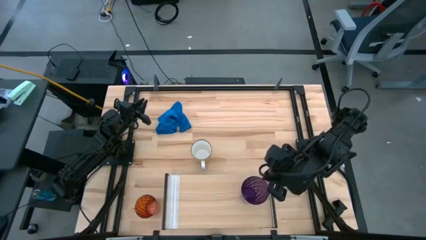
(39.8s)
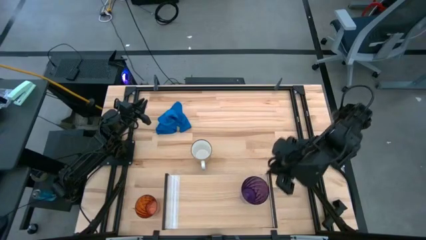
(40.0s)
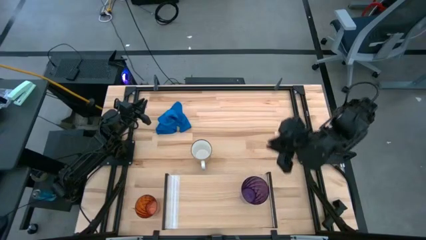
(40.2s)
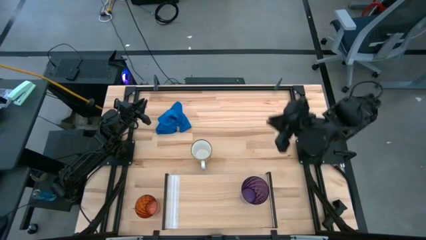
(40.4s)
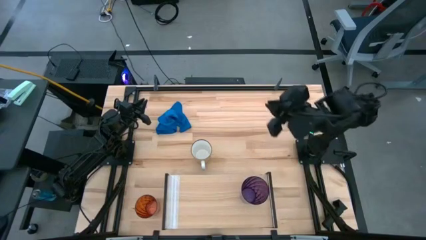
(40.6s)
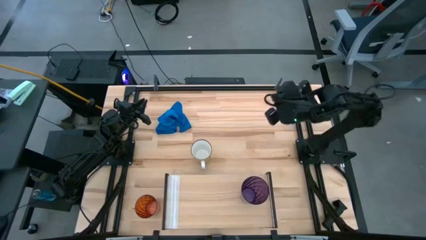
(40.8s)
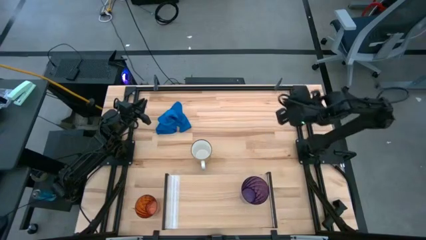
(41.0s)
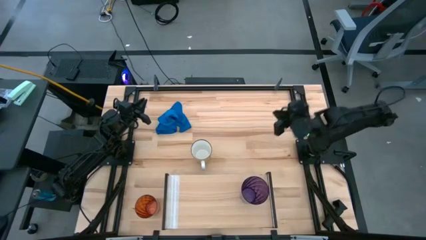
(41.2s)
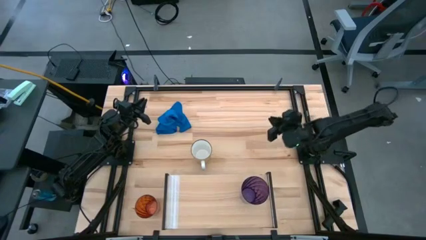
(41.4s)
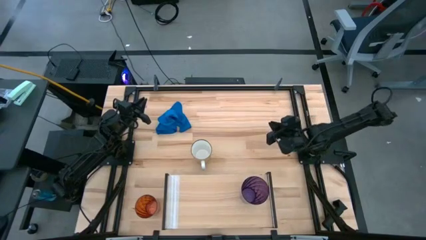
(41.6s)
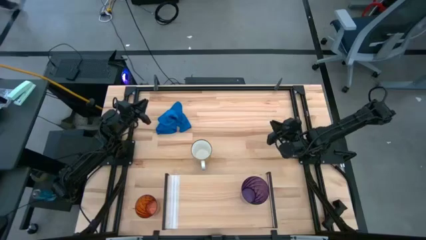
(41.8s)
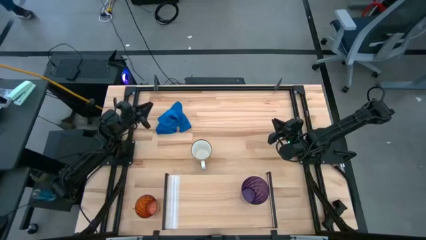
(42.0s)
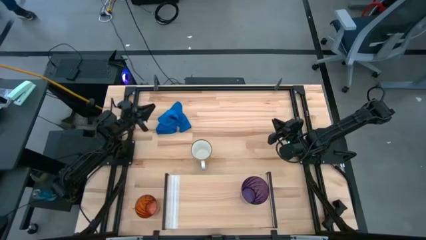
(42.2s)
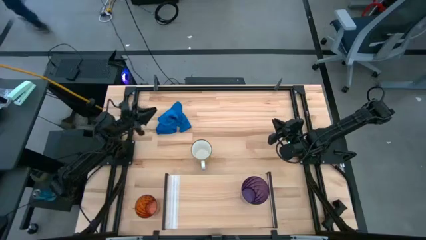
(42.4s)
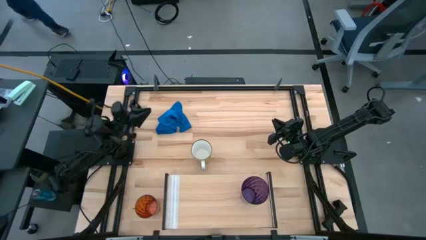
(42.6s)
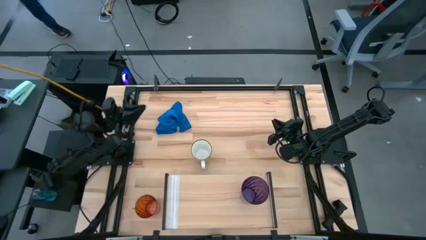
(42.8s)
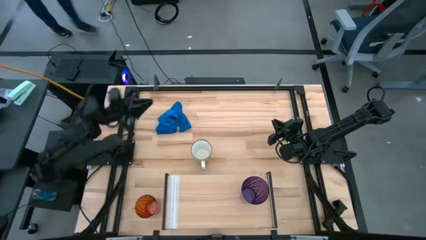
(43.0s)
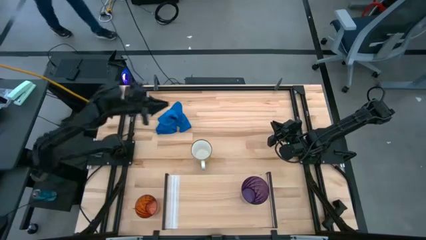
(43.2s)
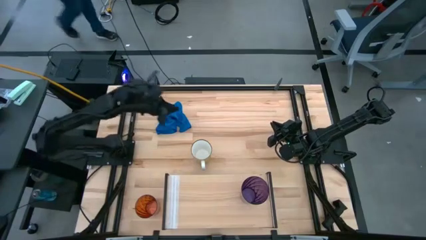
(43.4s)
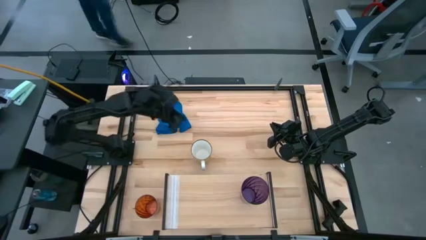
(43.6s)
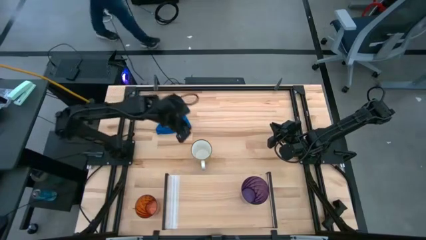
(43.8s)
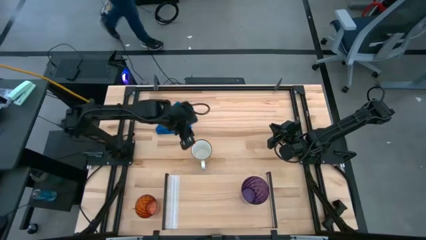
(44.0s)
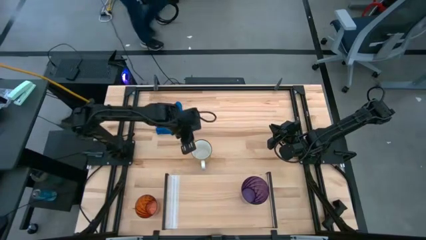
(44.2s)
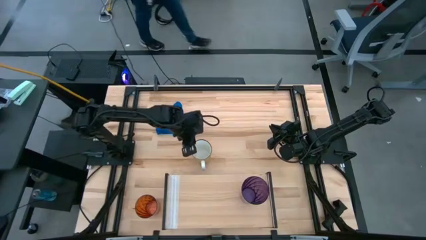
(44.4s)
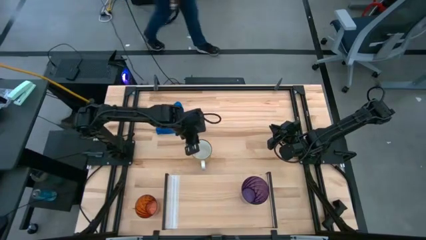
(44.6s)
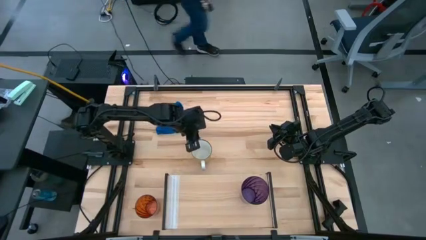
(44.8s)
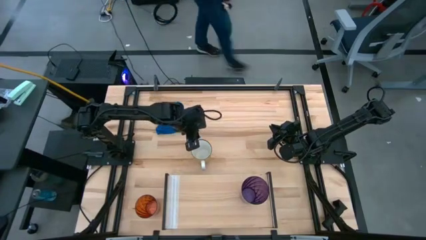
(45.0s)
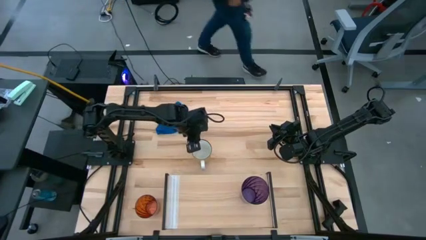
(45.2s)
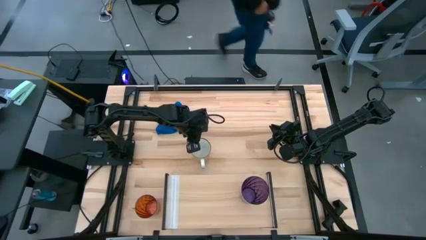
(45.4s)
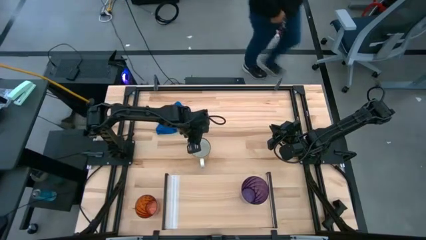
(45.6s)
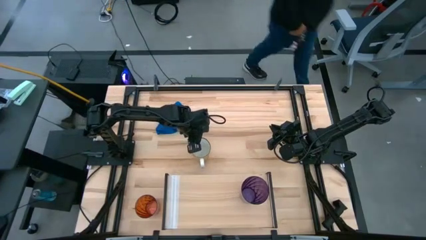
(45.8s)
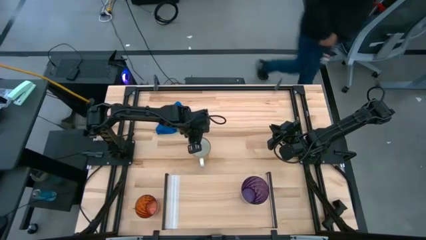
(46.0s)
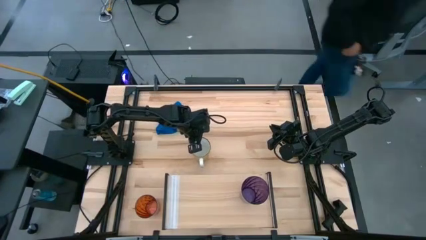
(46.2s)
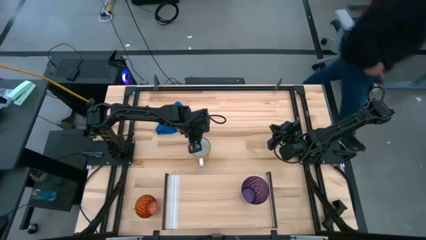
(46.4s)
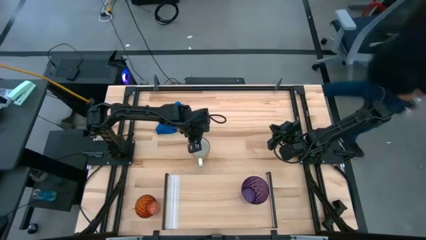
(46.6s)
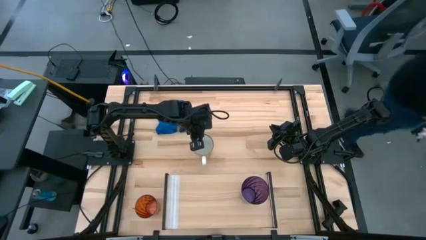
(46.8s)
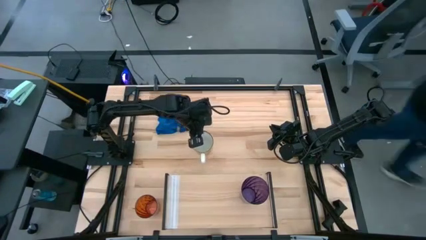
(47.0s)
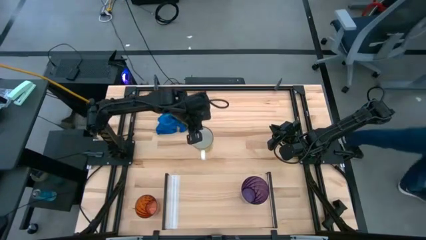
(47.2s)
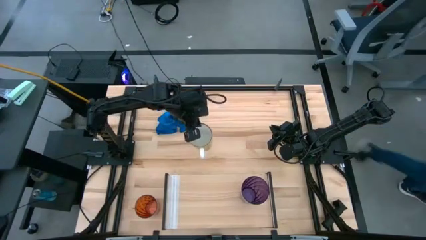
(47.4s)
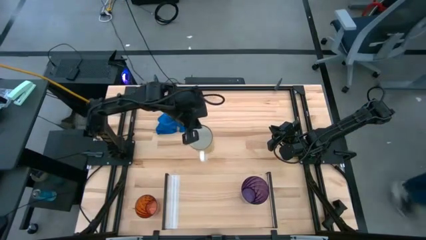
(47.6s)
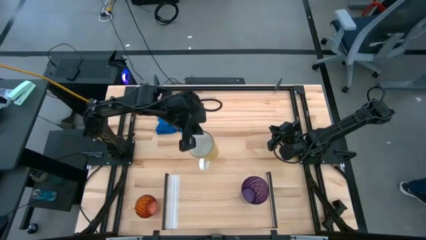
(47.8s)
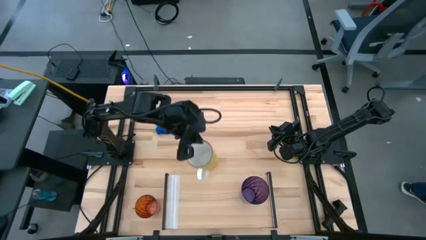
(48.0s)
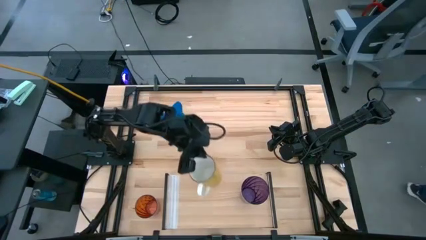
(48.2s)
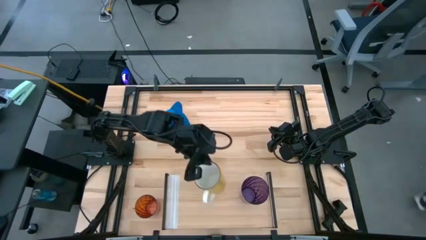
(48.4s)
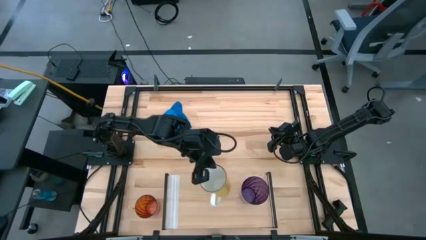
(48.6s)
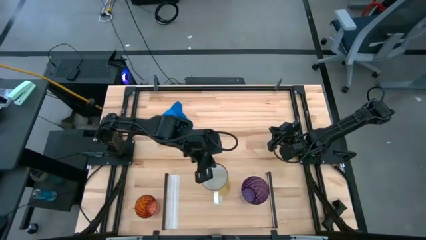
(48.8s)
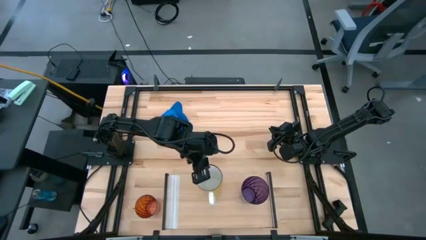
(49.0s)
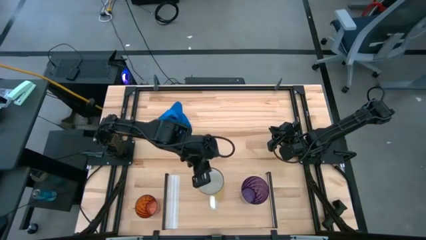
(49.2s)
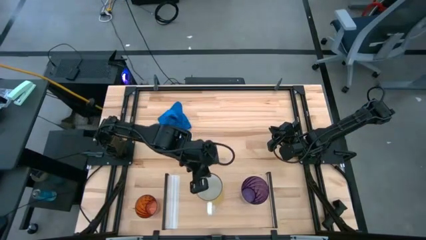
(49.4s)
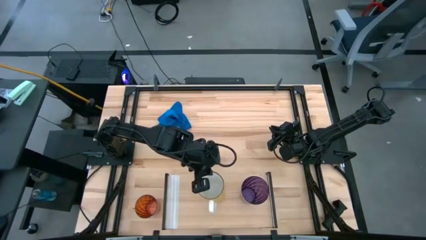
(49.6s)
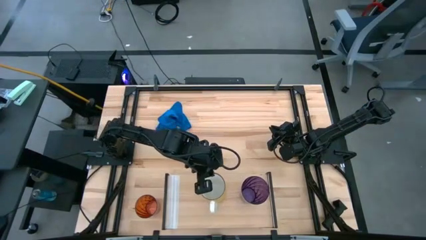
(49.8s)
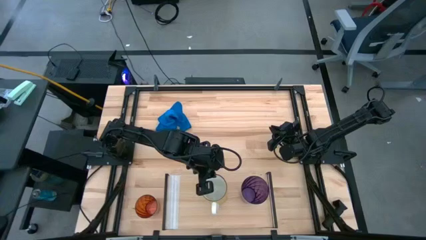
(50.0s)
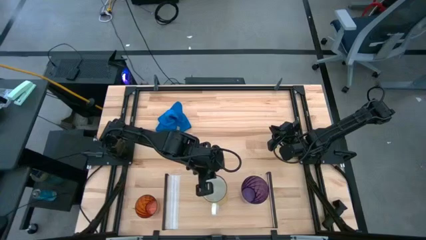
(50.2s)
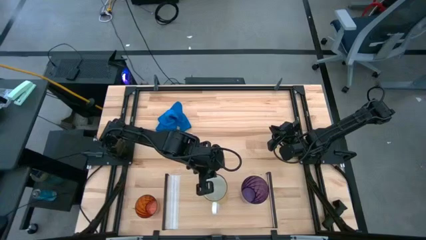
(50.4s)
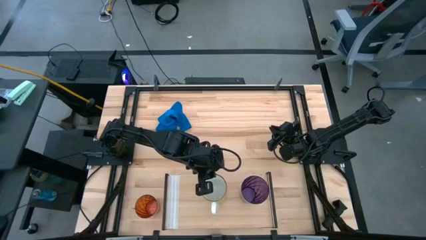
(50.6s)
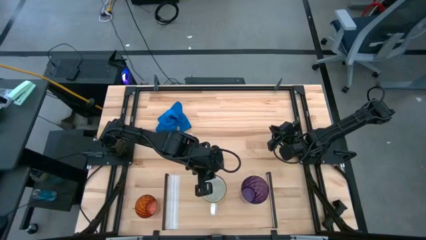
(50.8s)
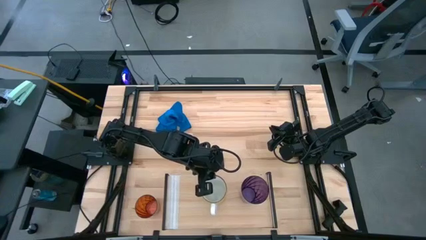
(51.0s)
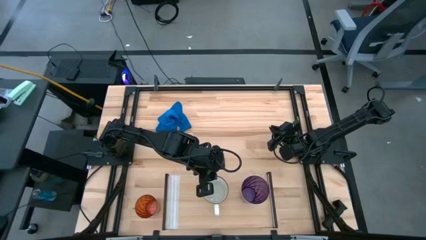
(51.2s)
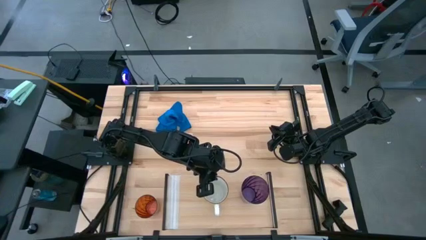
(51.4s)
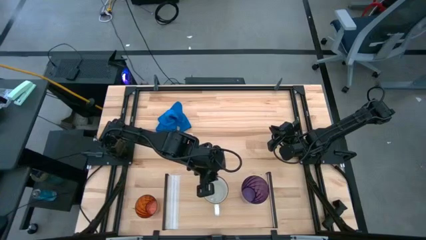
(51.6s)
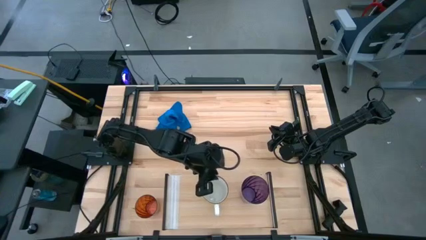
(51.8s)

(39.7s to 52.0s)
Task: Stack small to large cups/mugs on shelf
Put the yellow mug on the shelf

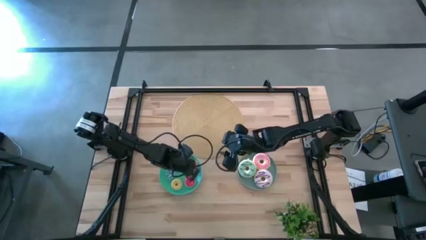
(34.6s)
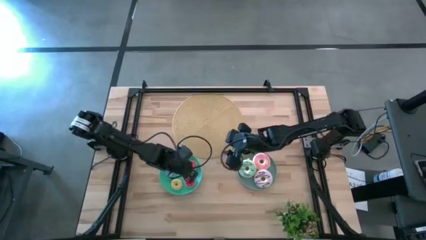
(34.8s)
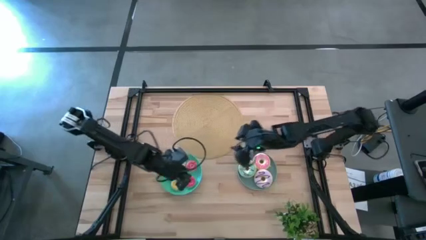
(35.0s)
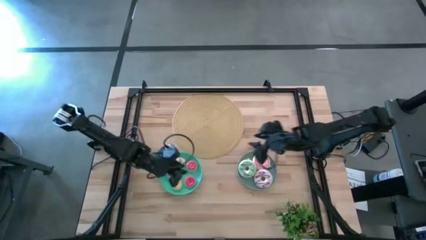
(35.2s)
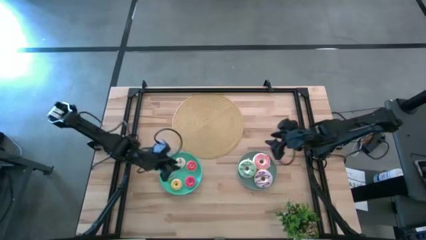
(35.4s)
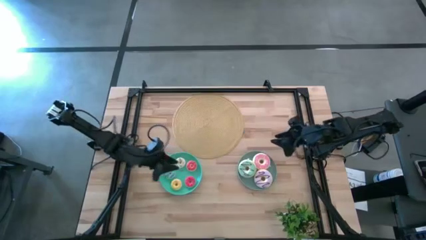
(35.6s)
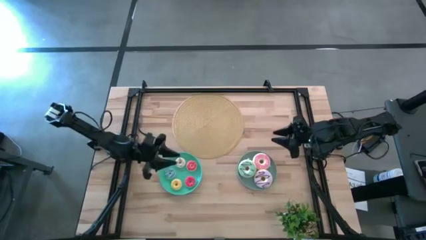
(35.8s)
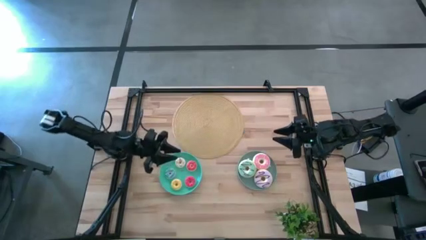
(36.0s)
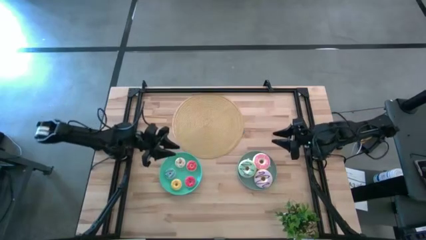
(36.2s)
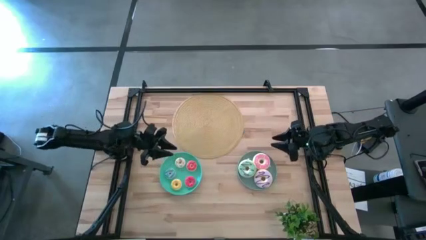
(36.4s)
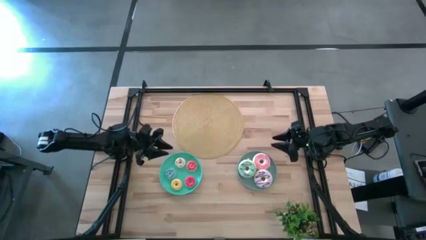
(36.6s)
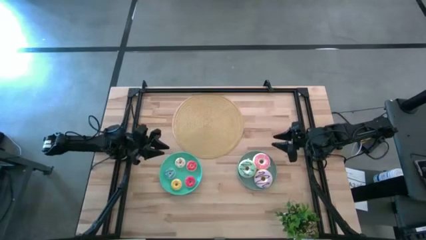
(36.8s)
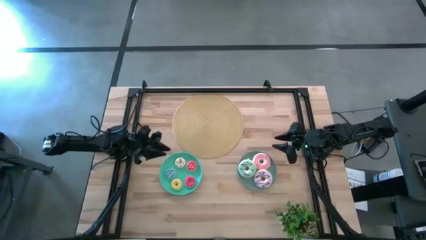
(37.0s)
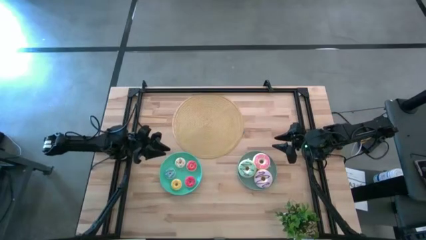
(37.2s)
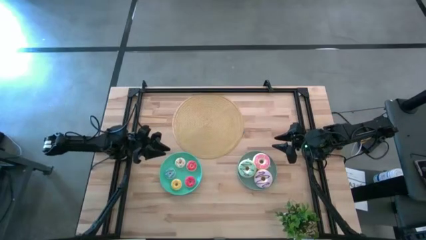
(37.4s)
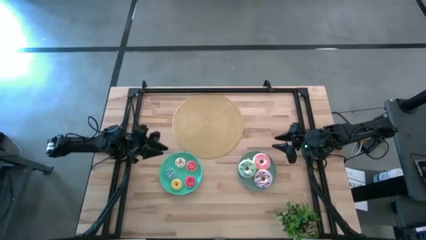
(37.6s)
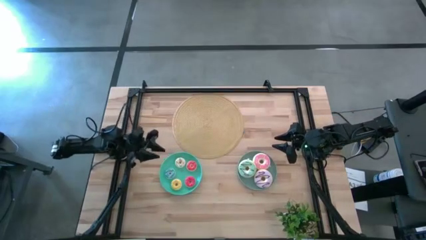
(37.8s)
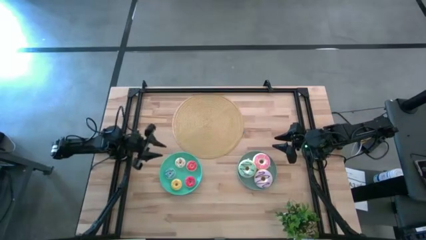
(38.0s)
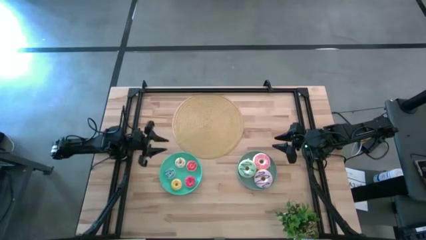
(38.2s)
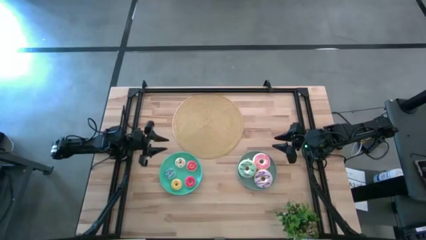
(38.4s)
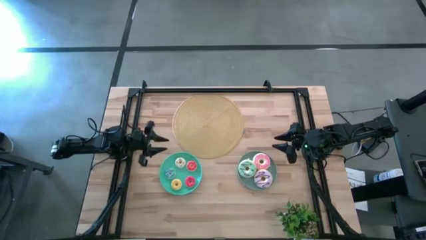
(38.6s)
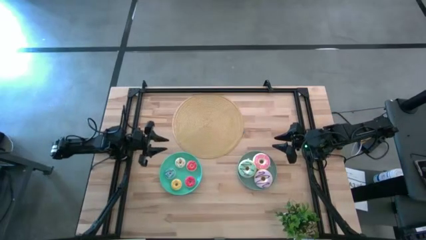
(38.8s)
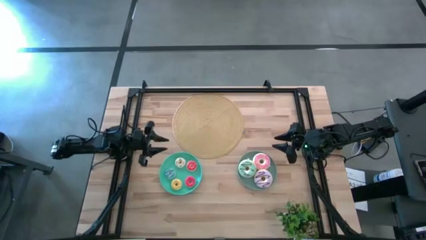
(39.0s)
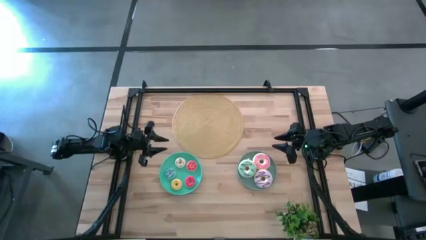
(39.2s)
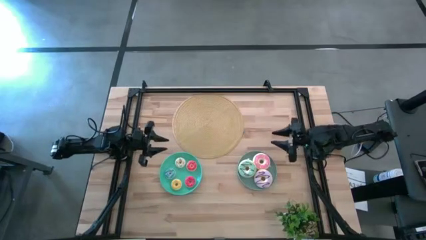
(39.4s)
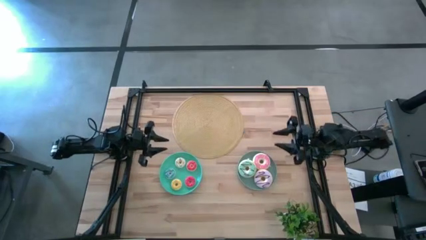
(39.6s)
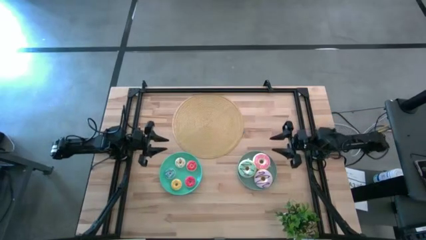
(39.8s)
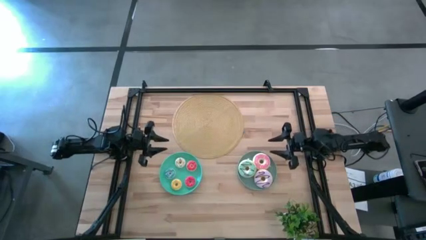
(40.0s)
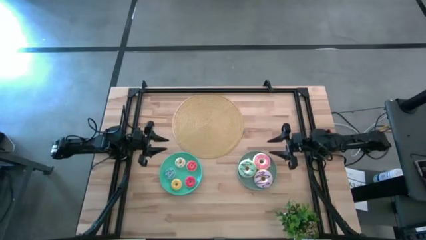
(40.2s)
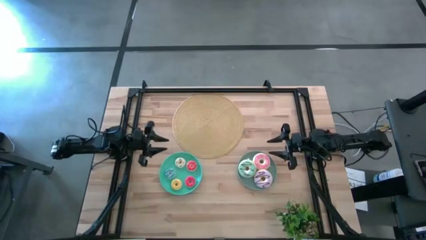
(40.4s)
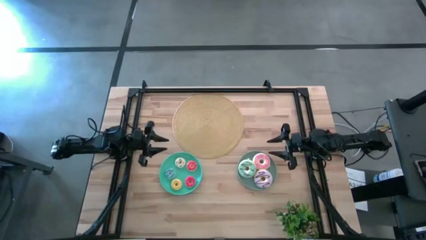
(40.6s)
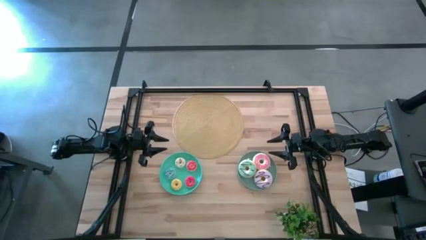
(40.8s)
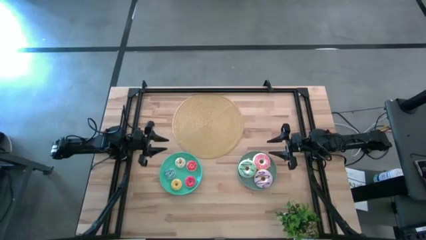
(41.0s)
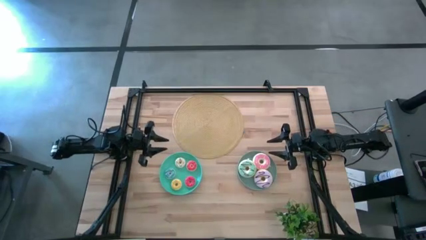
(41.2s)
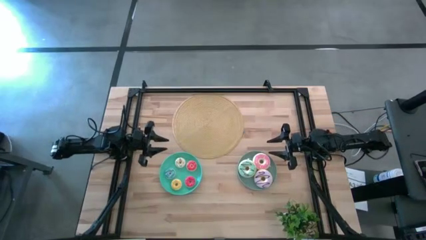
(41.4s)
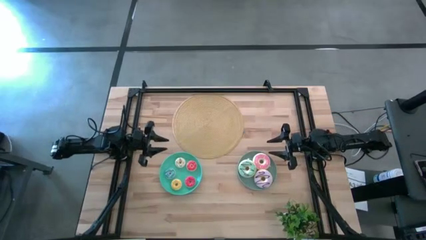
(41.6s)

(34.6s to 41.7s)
Task: Pick & Place donuts
Return to Home Position
